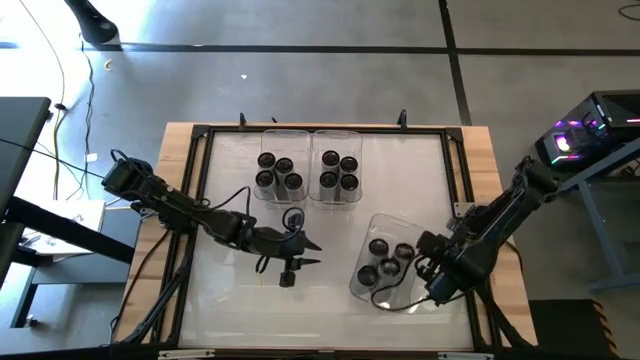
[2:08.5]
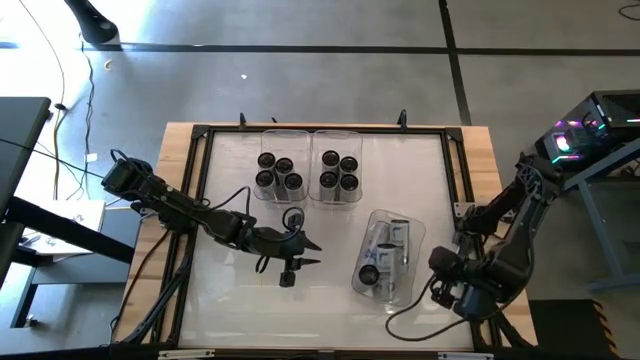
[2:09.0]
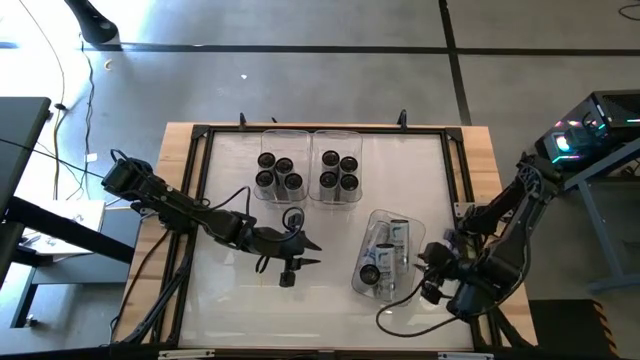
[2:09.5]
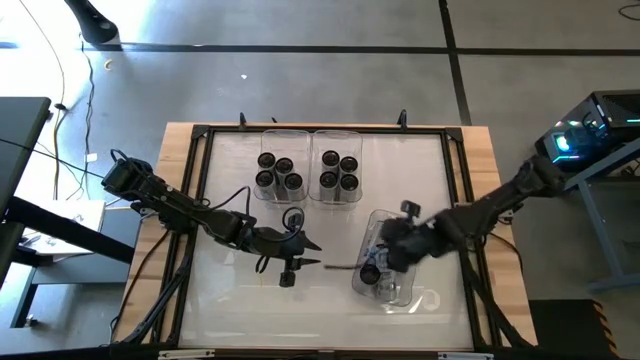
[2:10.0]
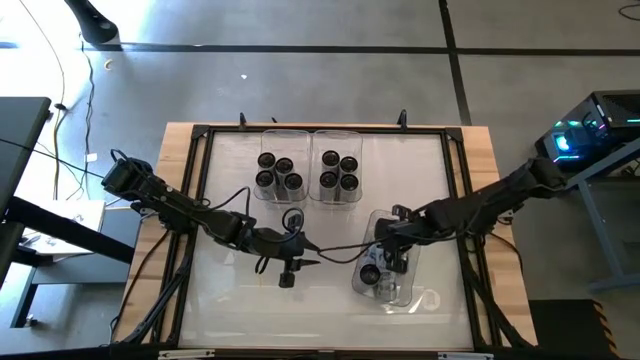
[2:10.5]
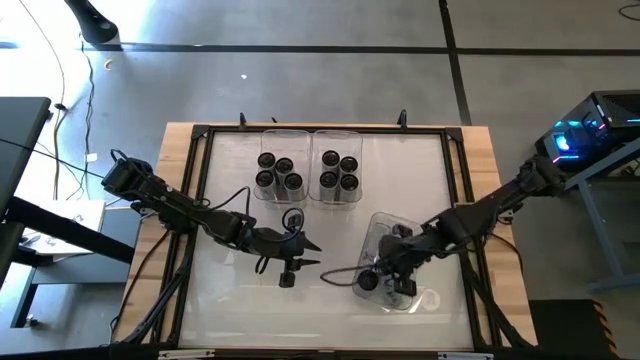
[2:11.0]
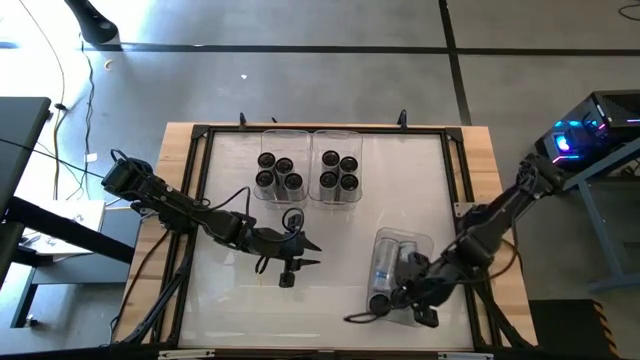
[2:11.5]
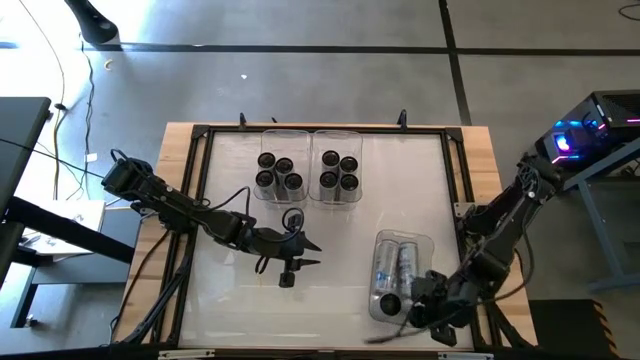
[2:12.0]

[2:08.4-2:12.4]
Task: Sort soda cans
Adjust the blue soda cans in the bottom right transparent bin

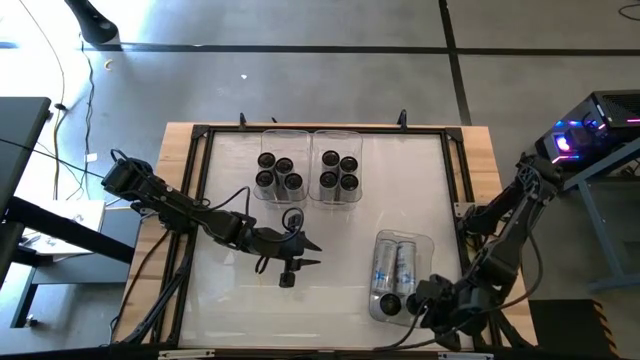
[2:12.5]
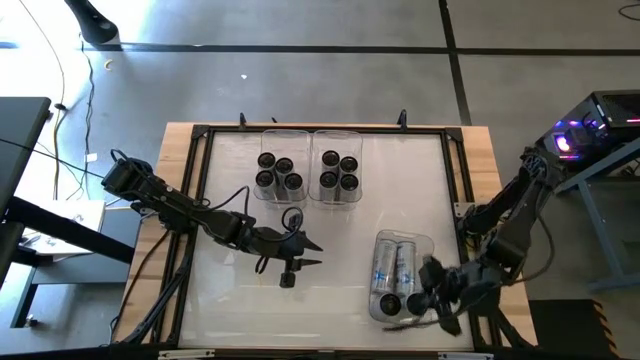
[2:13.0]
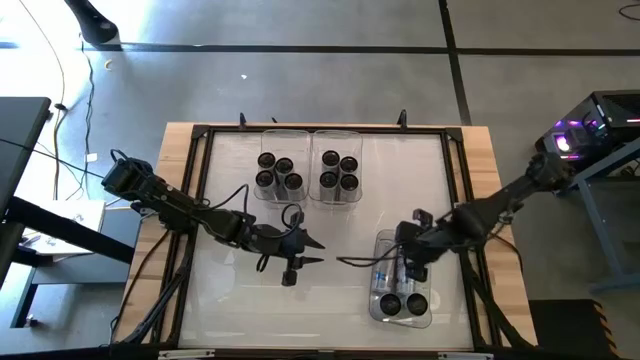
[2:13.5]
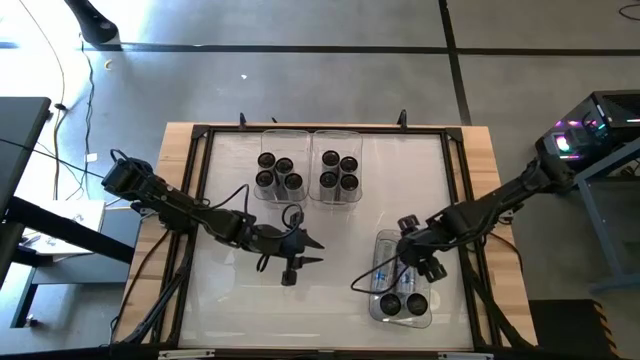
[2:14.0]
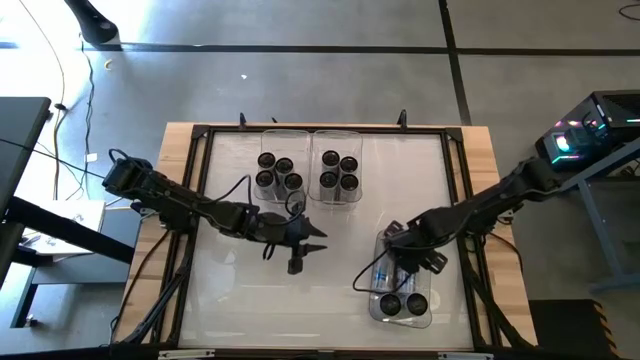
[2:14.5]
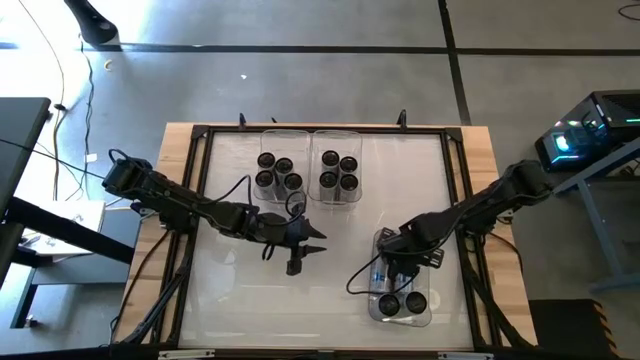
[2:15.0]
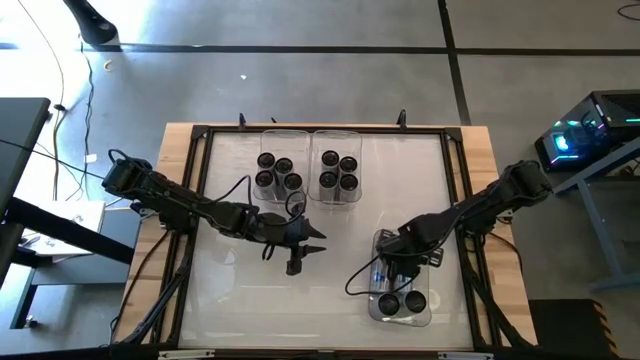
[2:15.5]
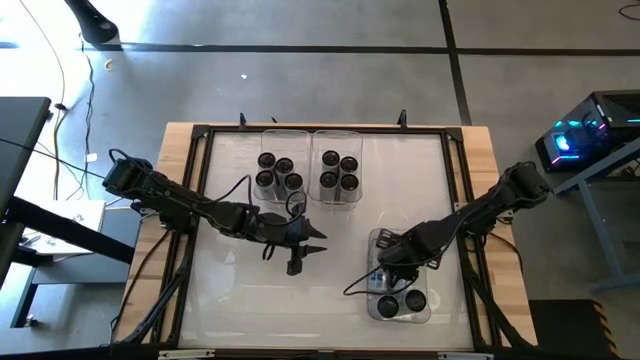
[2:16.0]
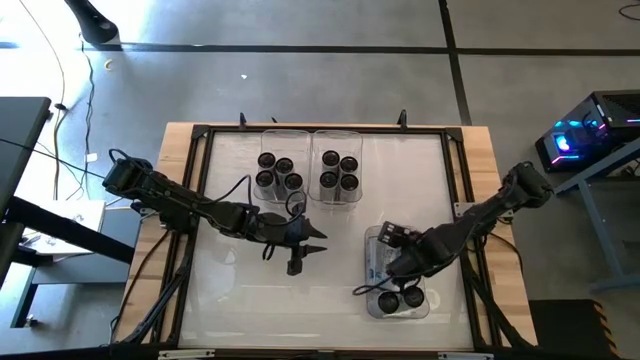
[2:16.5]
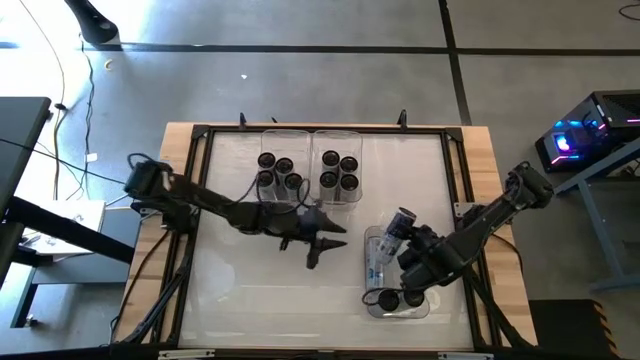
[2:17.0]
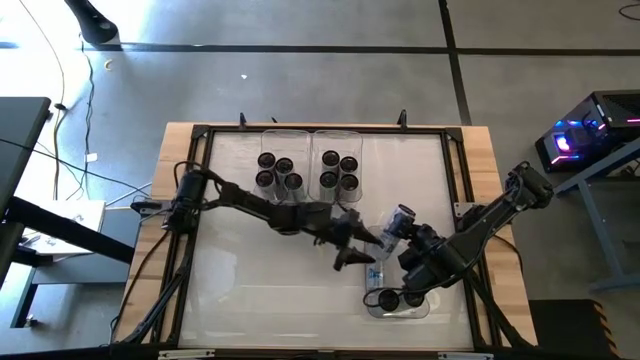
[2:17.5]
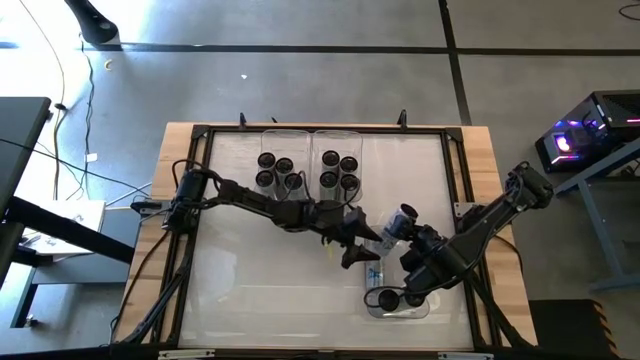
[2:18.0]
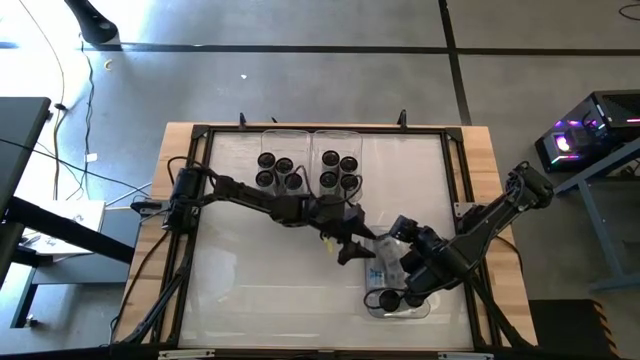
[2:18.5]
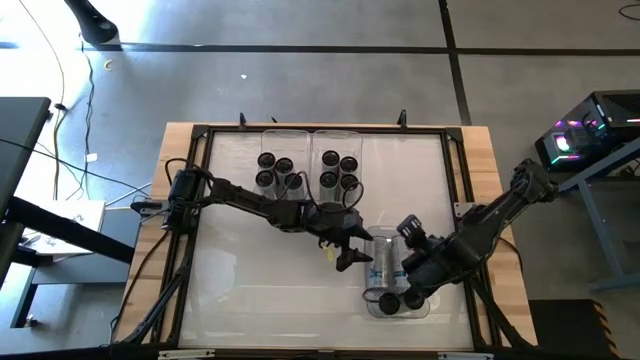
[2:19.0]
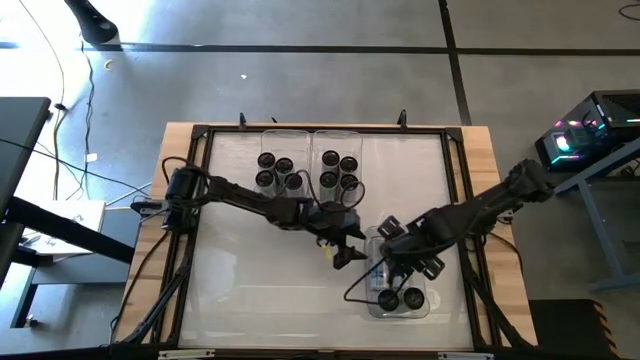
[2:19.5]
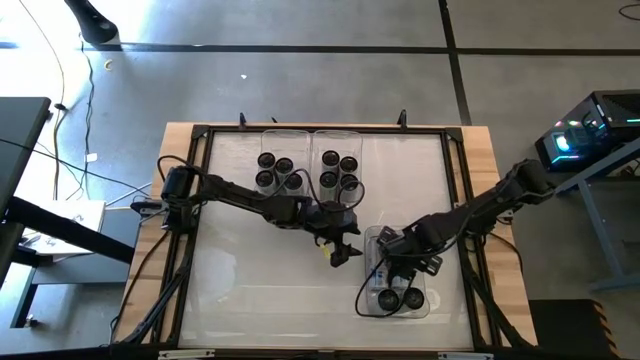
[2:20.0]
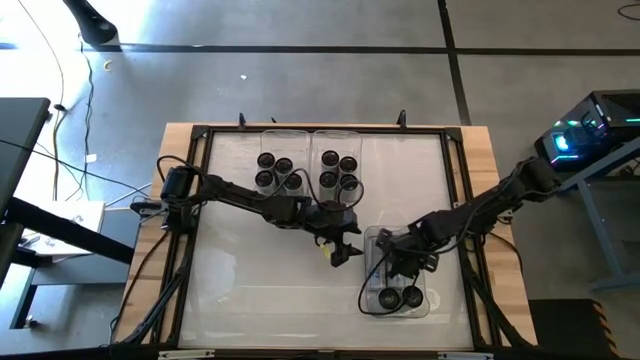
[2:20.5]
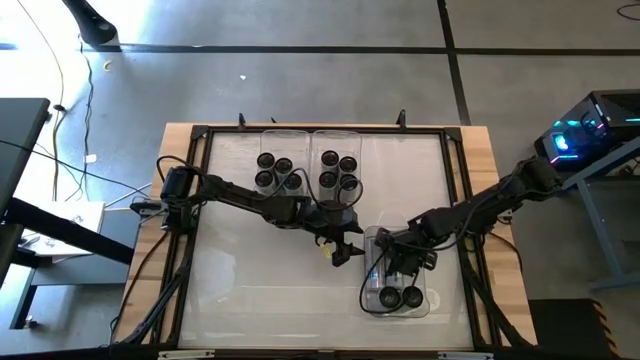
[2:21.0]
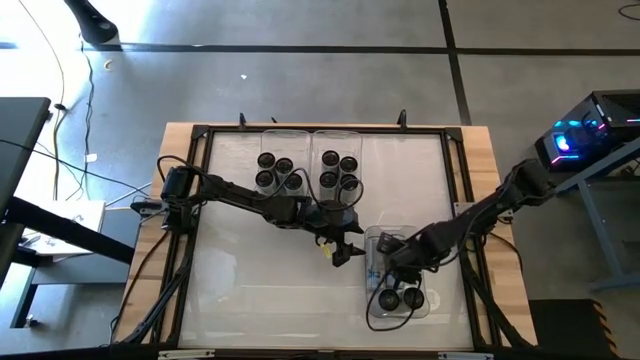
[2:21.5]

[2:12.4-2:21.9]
Adjust the blue soda cans in the bottom right transparent bin

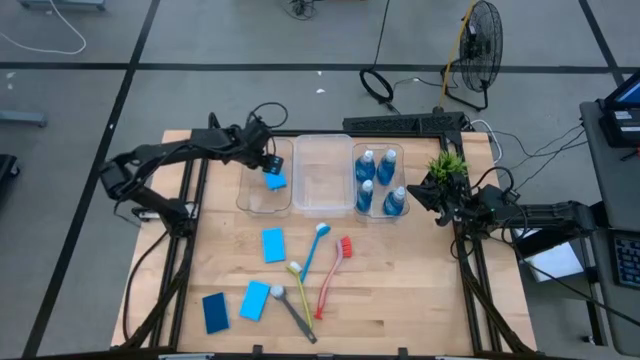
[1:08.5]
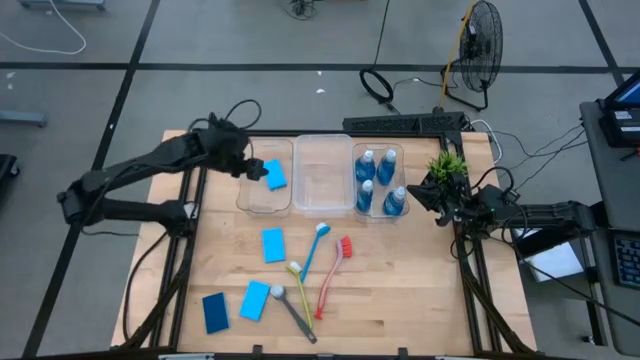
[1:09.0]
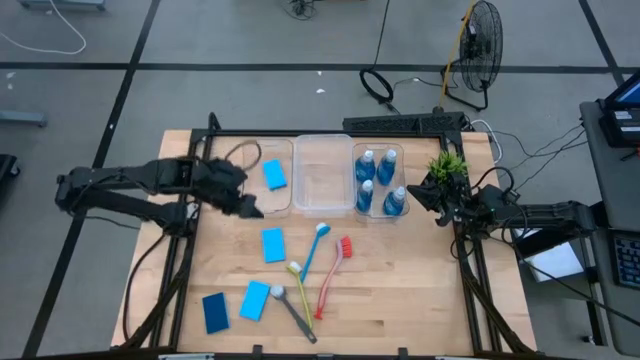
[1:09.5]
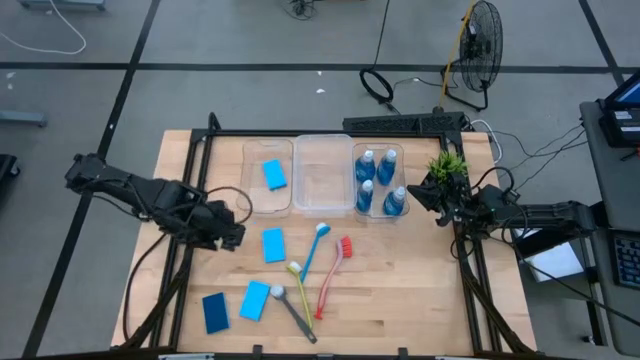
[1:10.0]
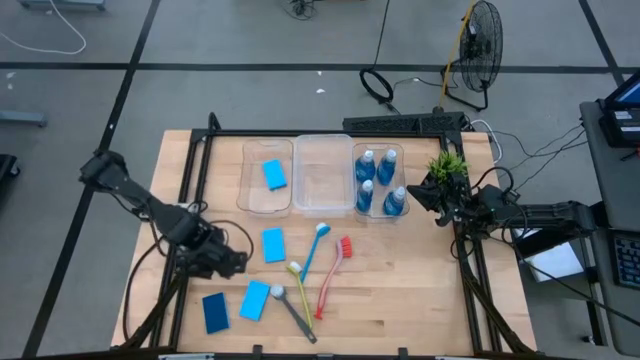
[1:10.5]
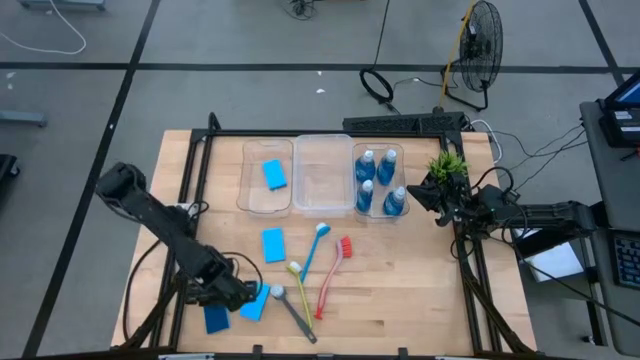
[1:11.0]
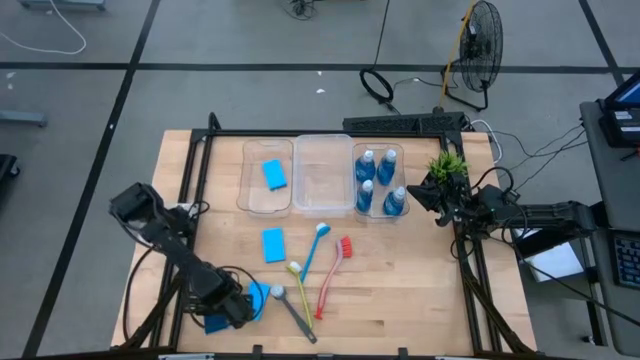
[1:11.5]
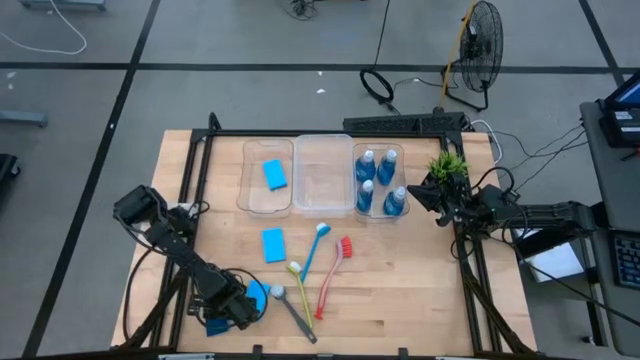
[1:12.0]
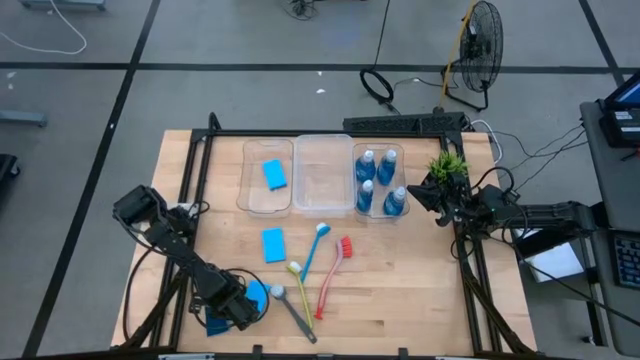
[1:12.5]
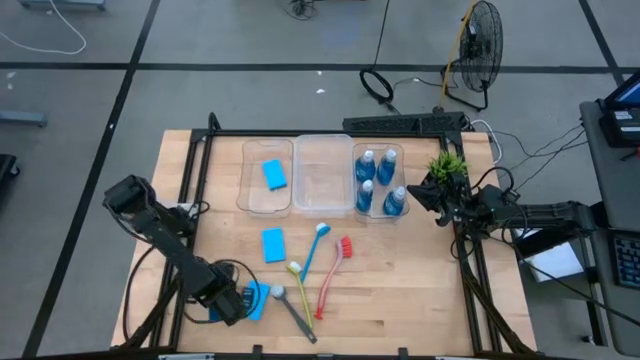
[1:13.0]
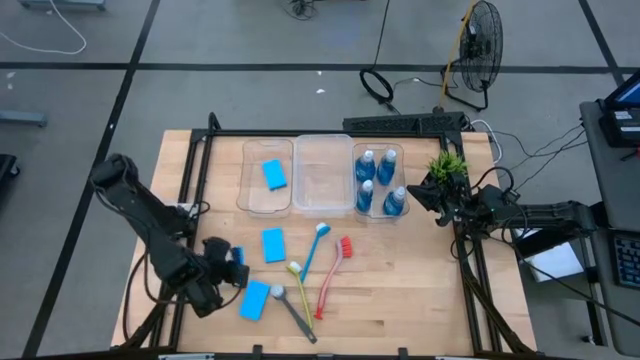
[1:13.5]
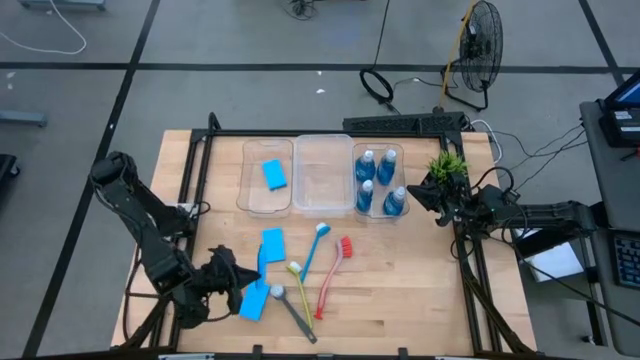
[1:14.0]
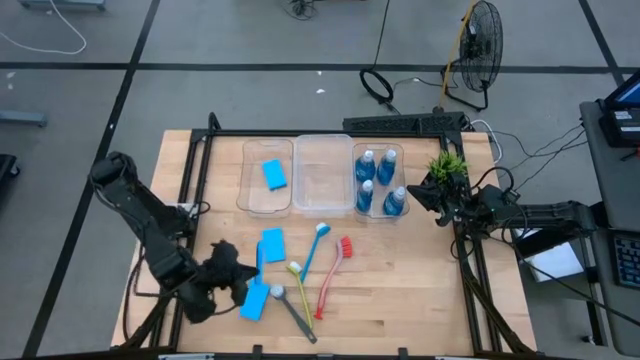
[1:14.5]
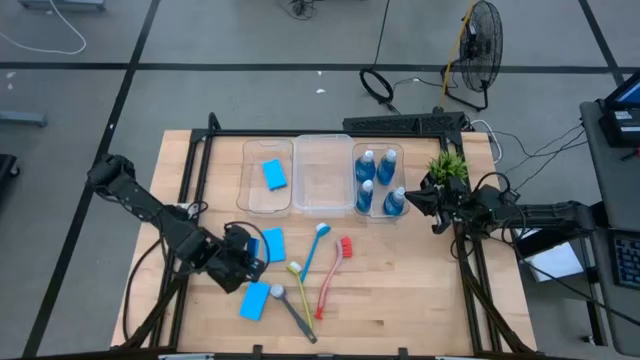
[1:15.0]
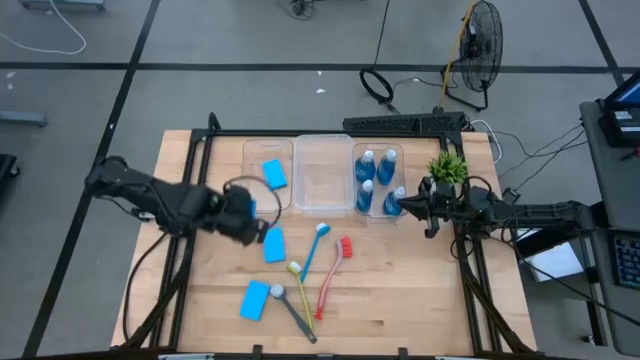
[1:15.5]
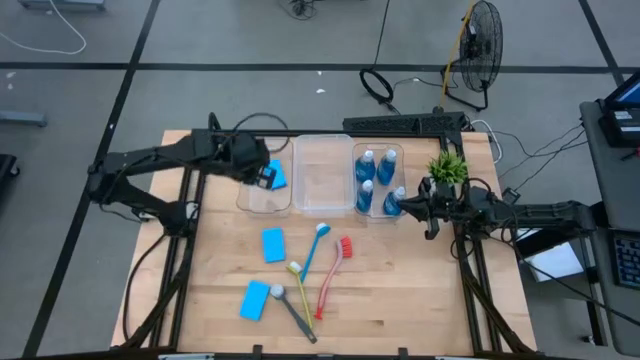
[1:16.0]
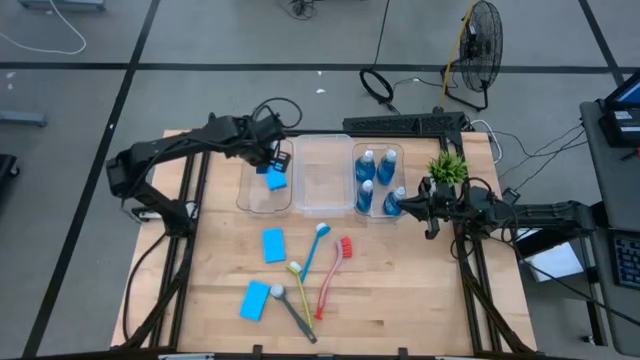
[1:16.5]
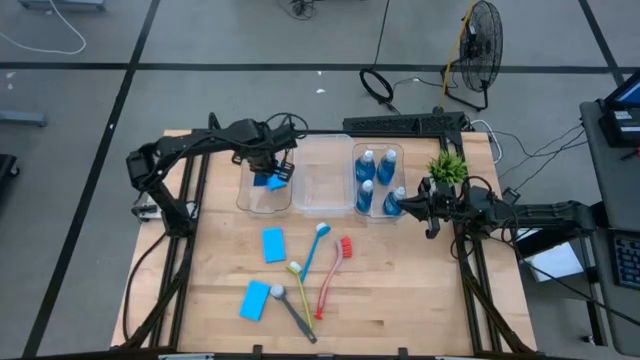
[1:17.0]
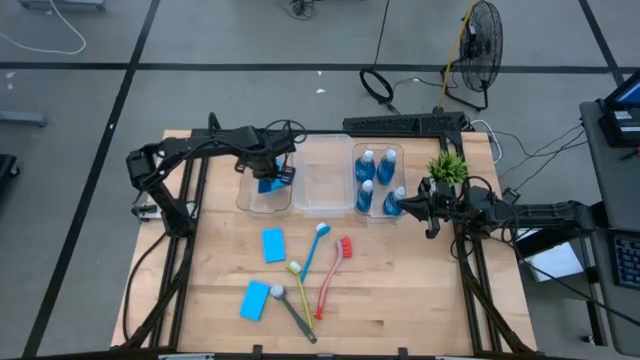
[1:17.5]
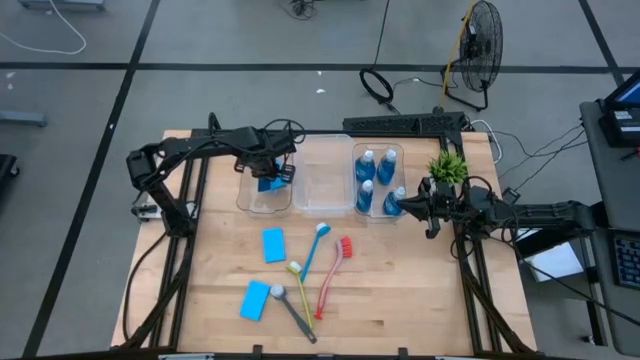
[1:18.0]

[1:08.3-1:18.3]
Task: Pick & Place Kitchen Sink Supplies
Put the blue sponge wipe into the left transparent bin
